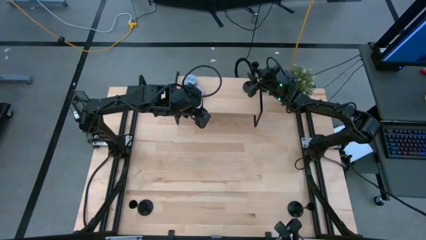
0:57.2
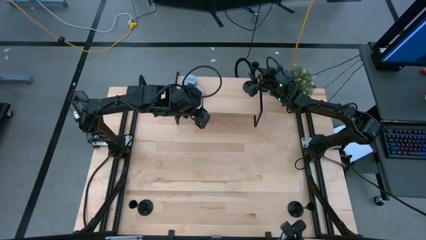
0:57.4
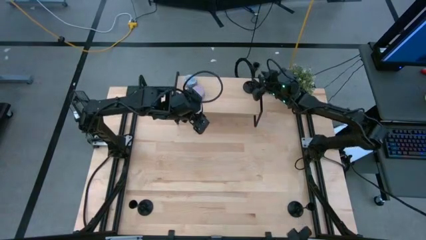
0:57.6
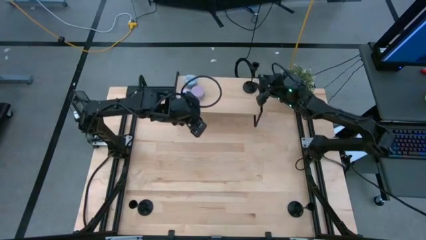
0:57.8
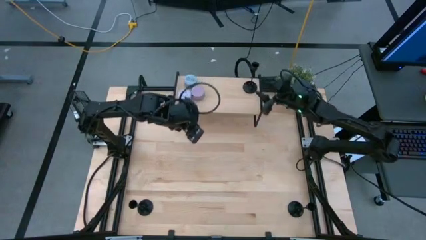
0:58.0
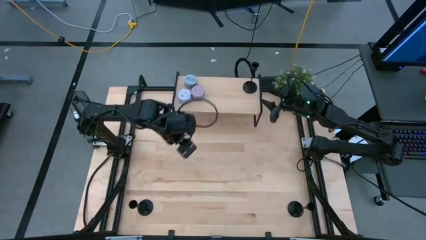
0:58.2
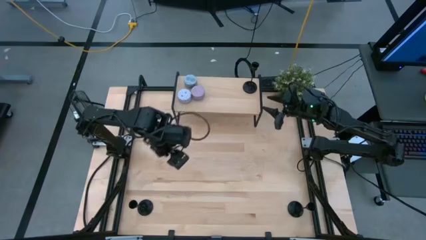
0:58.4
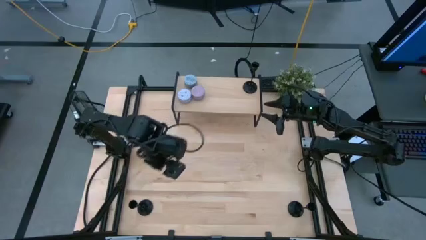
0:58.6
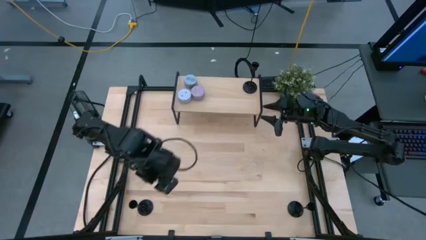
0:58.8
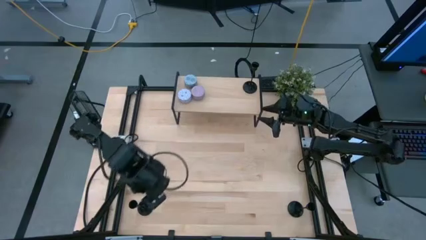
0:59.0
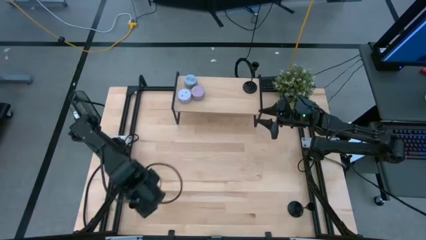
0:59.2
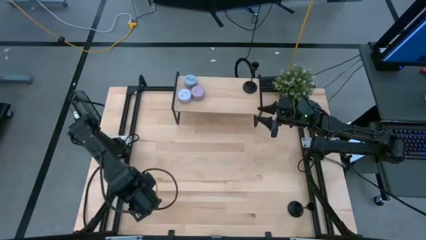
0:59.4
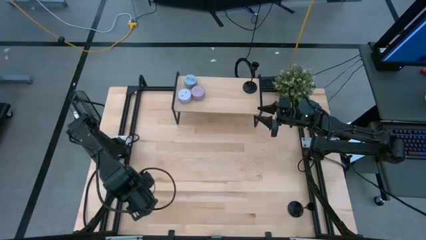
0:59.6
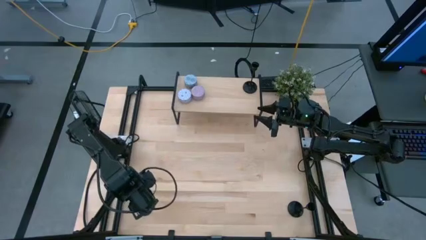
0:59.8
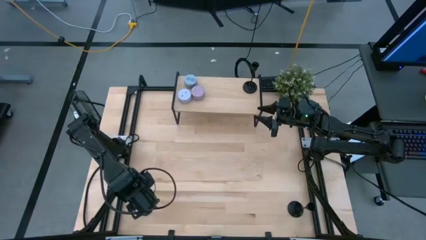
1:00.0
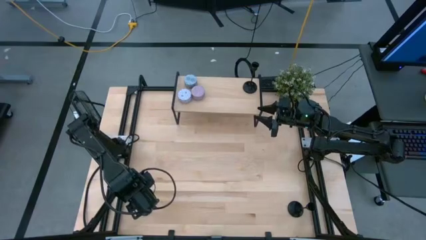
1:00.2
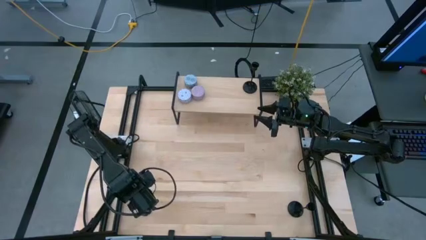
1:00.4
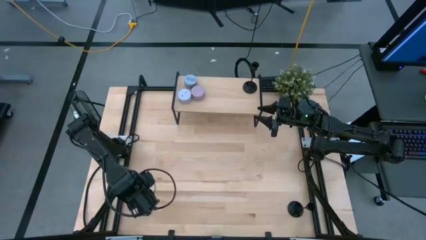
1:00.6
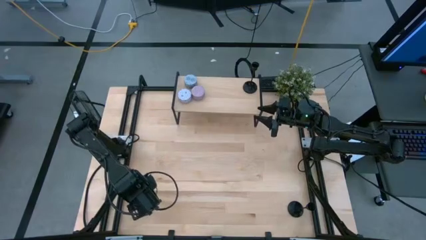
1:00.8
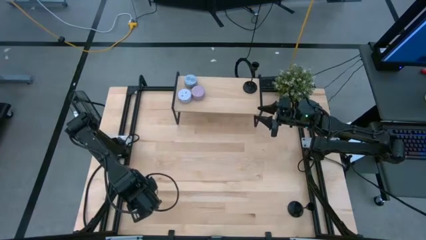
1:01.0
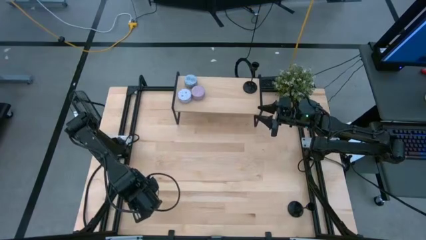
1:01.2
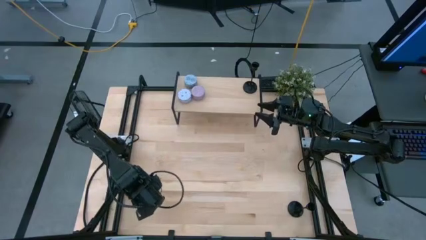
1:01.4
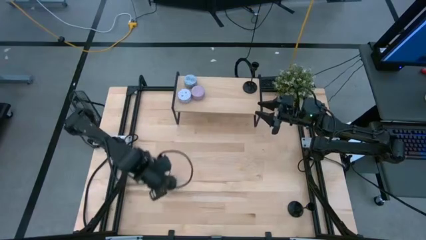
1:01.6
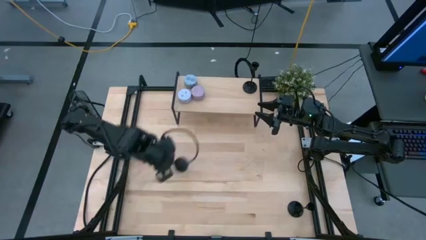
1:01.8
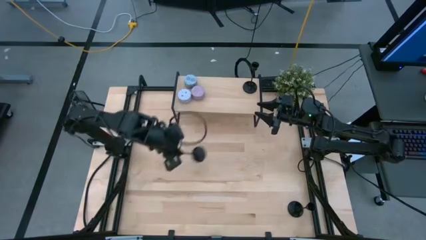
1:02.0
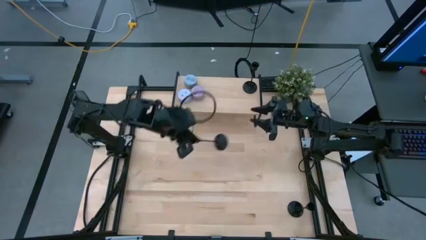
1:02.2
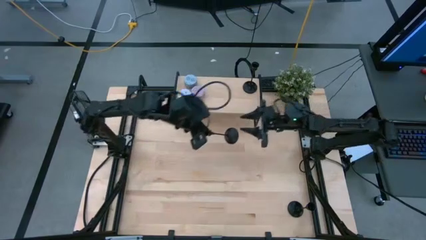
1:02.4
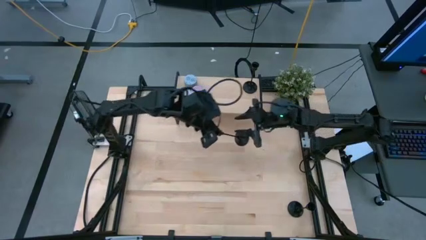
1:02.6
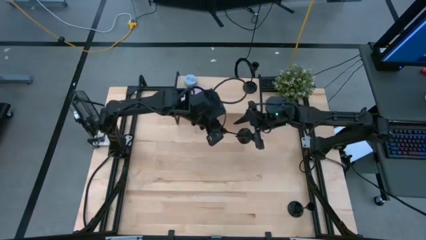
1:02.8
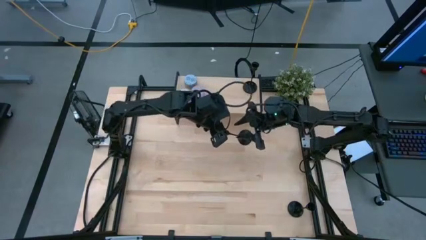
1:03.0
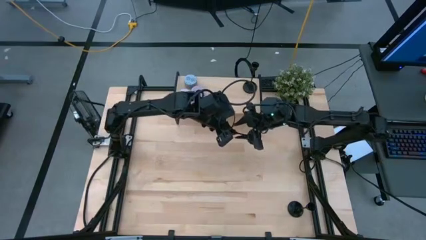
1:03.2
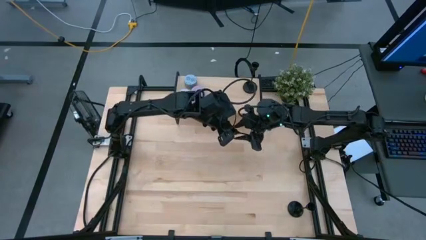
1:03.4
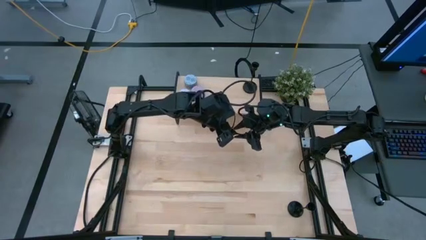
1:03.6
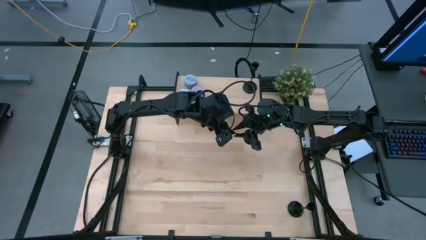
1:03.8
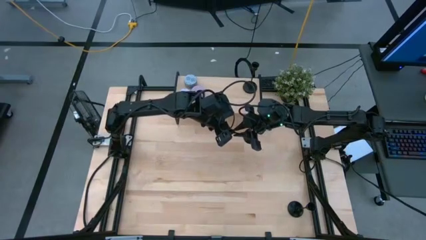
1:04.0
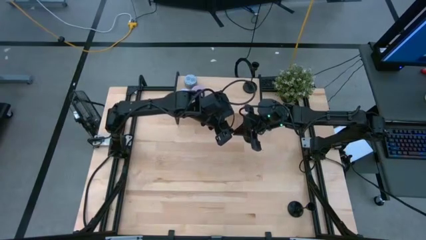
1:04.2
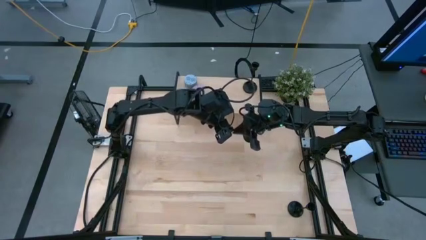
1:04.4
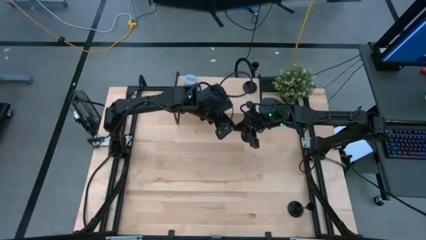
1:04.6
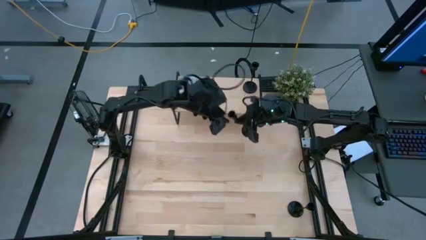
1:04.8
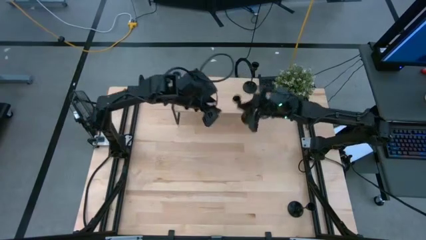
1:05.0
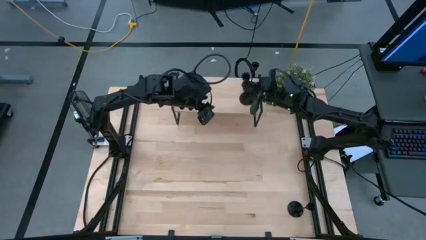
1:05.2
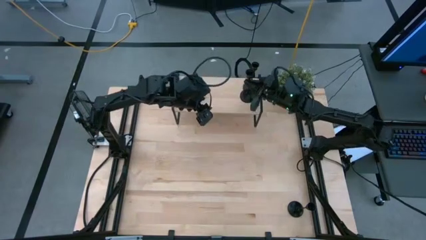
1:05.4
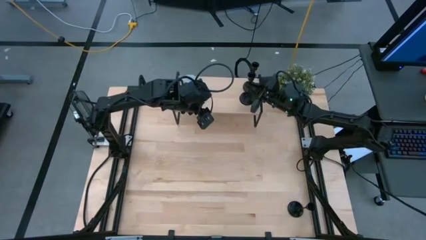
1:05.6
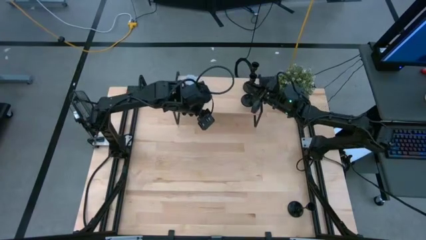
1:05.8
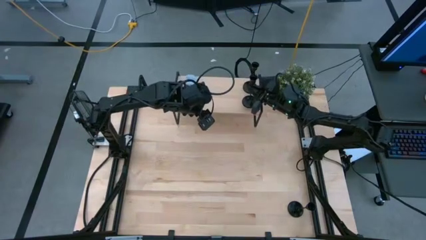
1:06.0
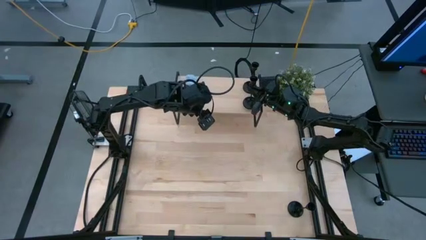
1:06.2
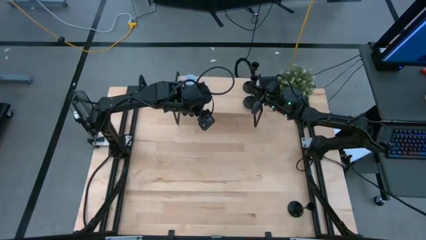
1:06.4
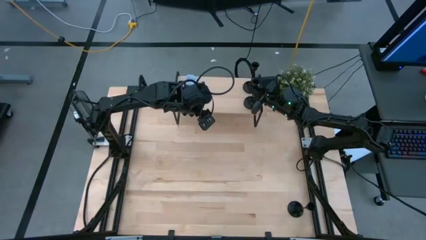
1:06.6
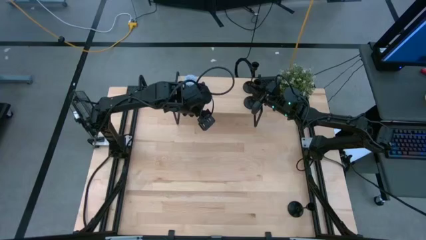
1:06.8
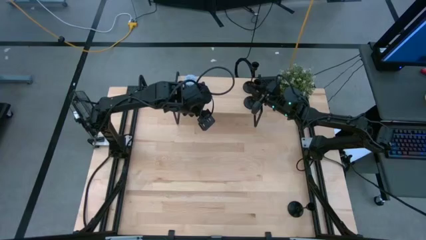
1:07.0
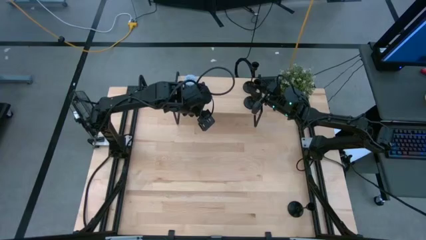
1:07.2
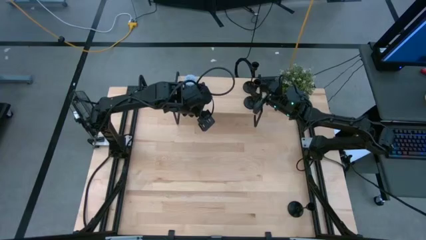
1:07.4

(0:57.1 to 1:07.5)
Task: Pick & Place candle stick holders
Put the left black candle holder on the shelf
